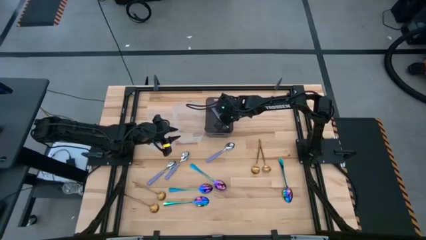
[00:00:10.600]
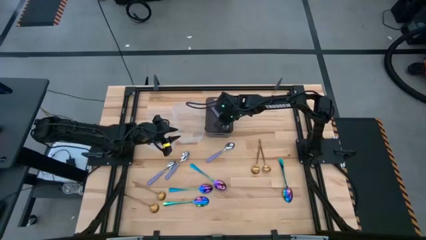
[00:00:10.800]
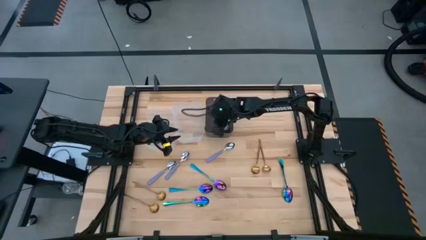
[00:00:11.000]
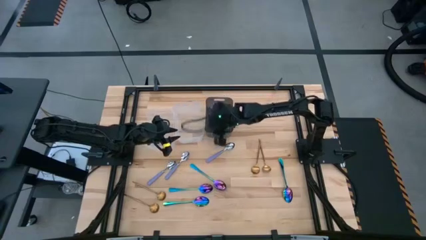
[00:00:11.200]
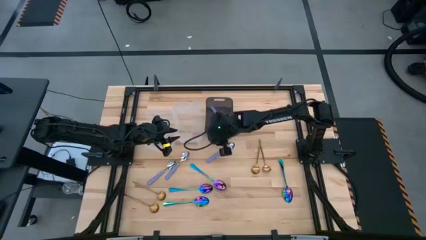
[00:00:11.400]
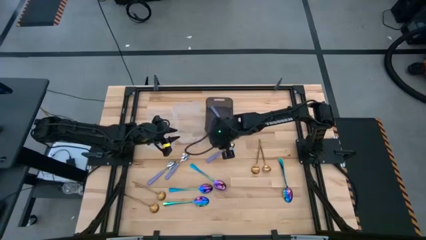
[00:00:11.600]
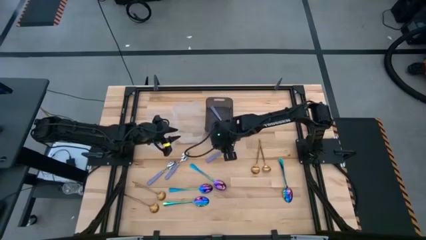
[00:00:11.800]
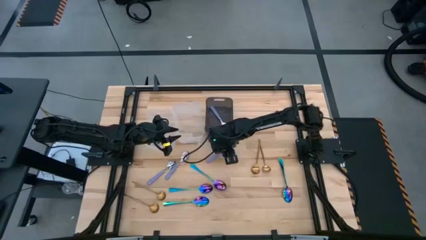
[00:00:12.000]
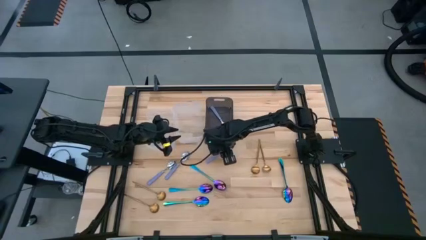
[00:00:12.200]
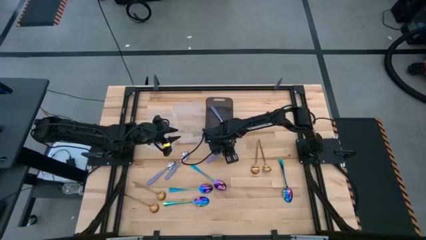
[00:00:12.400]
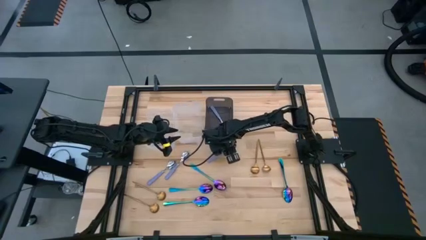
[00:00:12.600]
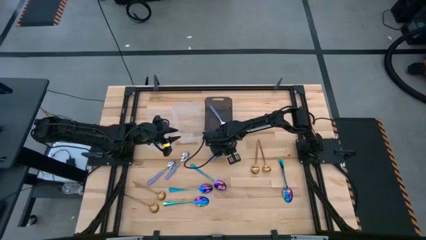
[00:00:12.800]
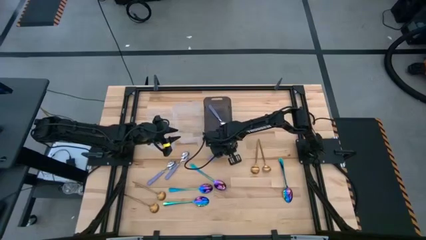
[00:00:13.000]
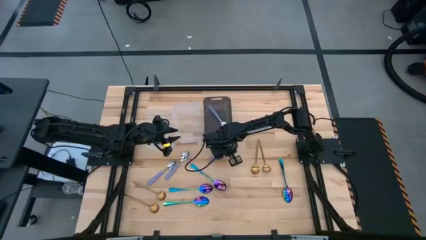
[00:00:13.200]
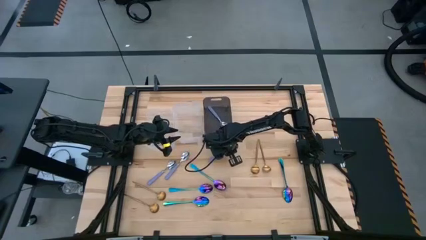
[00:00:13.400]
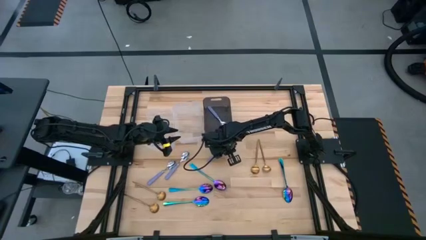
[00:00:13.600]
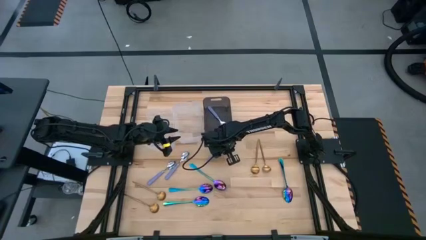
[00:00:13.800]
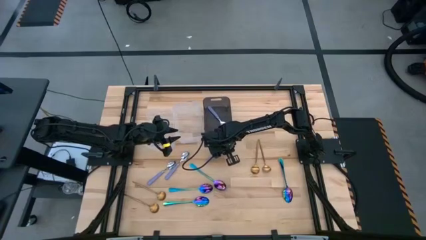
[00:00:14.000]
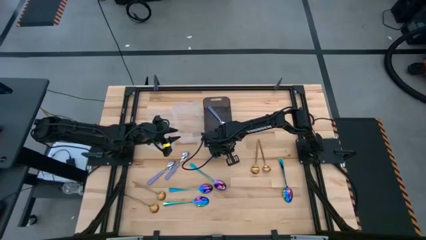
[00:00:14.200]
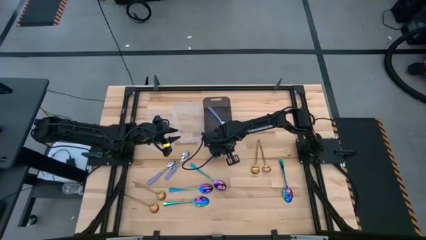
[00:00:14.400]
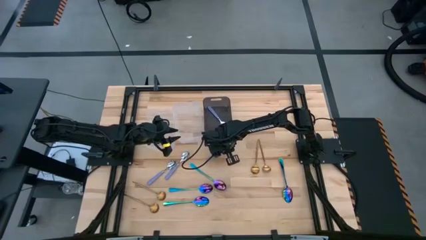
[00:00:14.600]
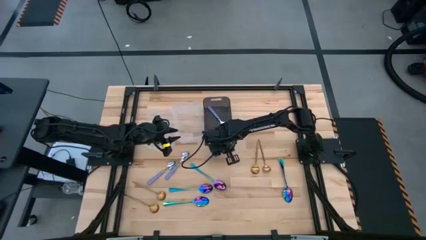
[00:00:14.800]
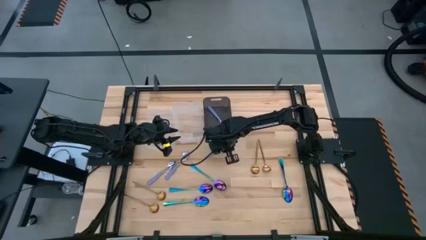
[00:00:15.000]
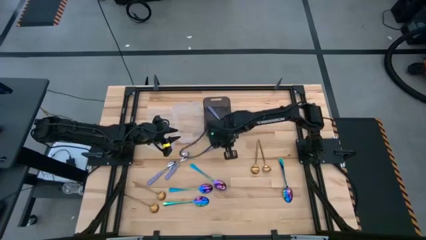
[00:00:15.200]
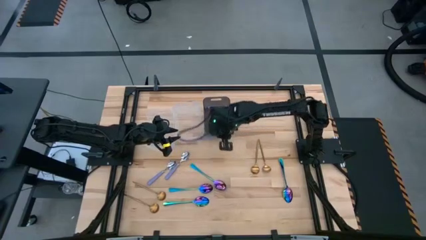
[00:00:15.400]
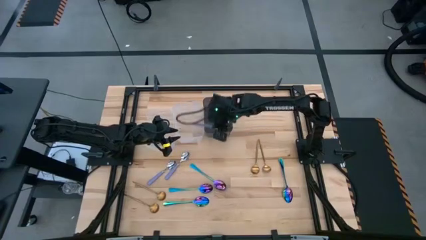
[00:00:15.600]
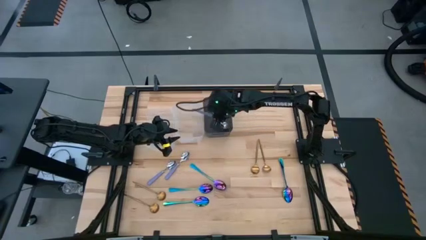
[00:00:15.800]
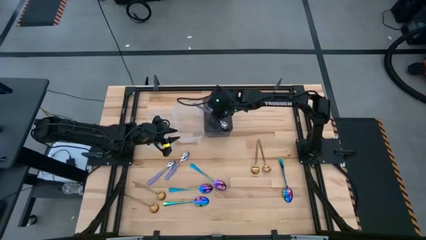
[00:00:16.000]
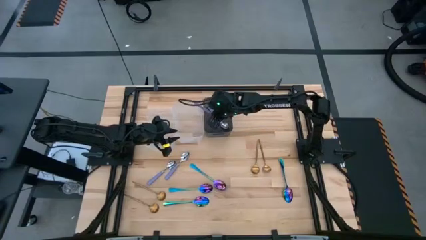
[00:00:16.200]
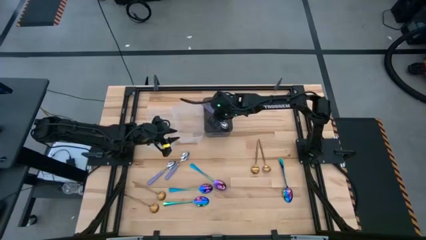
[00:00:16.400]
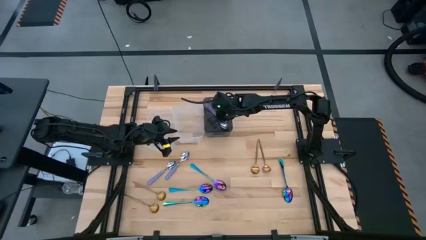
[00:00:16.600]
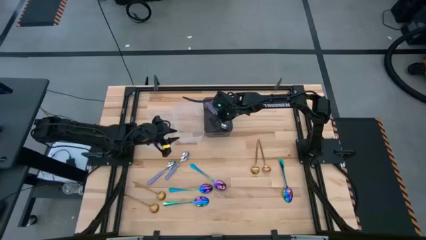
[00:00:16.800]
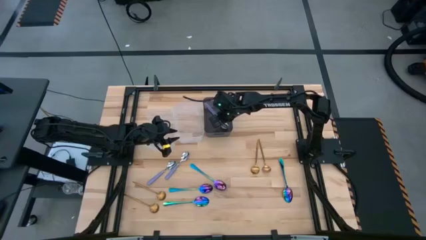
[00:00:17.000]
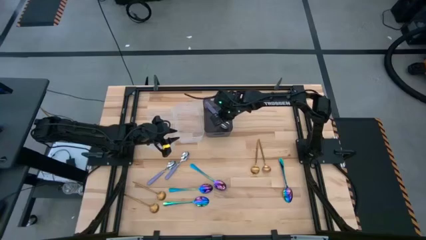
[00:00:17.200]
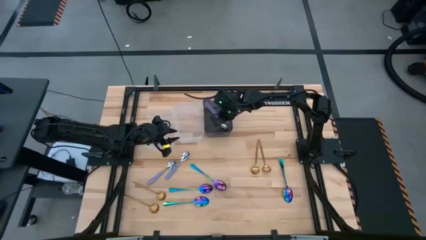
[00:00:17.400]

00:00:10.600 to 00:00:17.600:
Task: Sort silverware by color (type)
Put the purple spoon into the black transparent bin

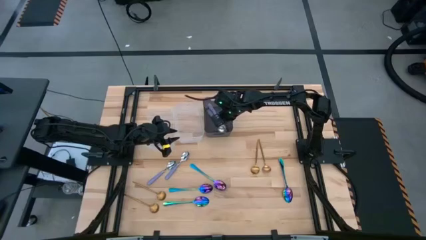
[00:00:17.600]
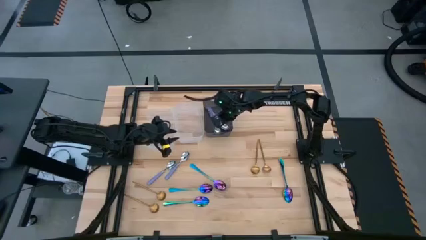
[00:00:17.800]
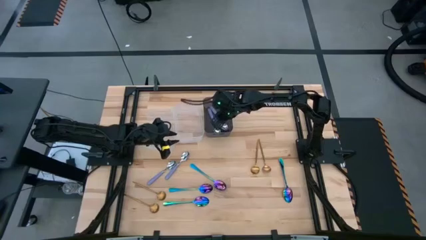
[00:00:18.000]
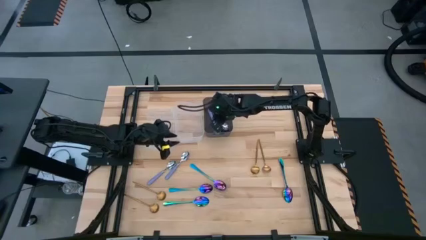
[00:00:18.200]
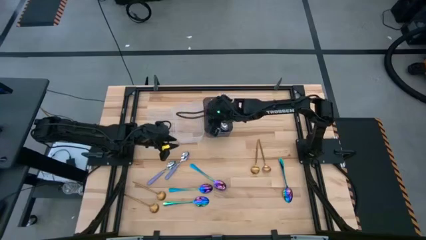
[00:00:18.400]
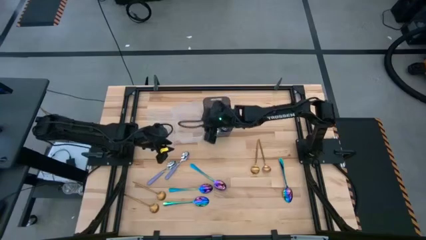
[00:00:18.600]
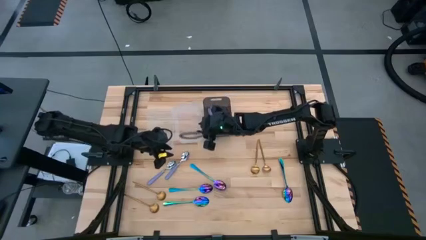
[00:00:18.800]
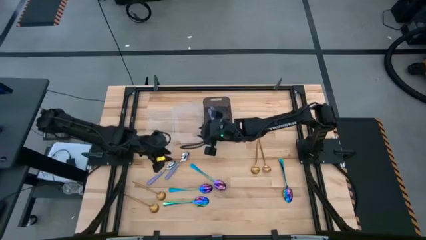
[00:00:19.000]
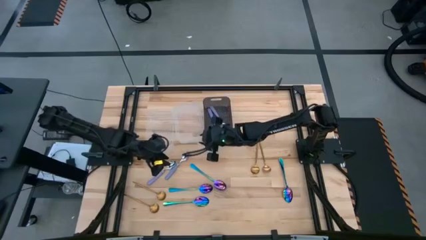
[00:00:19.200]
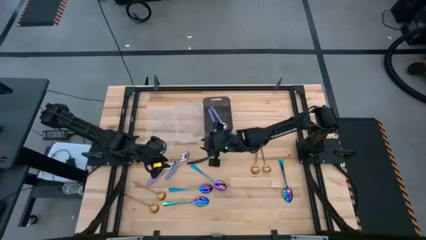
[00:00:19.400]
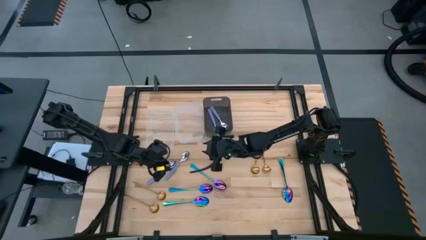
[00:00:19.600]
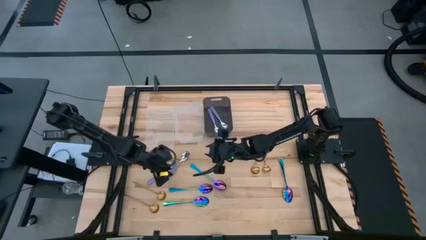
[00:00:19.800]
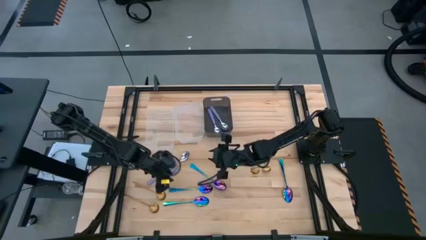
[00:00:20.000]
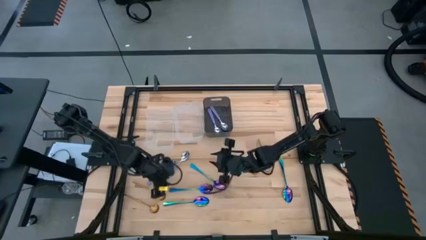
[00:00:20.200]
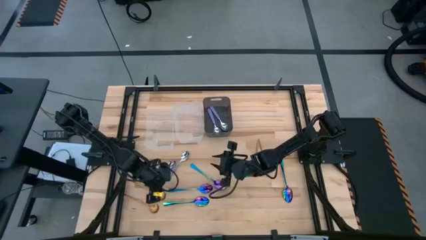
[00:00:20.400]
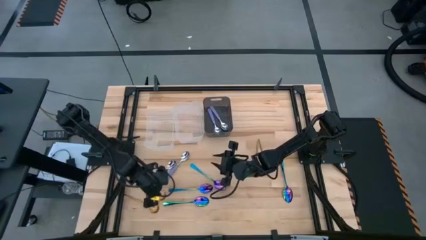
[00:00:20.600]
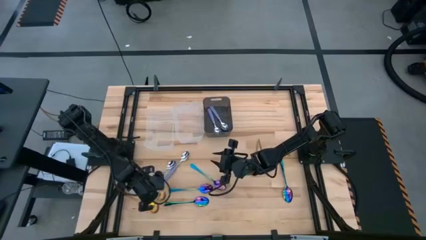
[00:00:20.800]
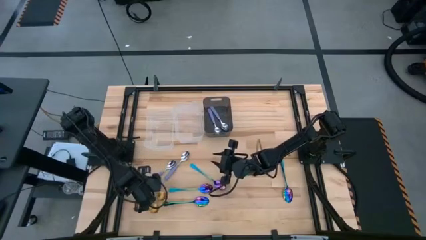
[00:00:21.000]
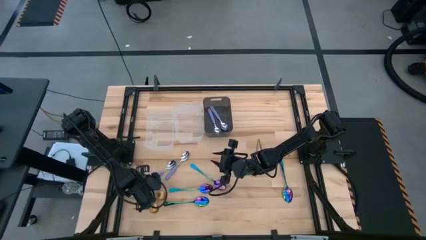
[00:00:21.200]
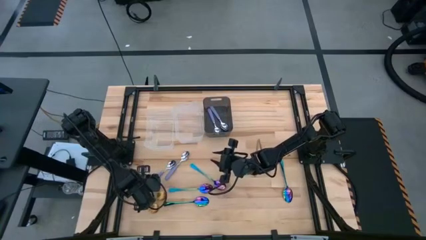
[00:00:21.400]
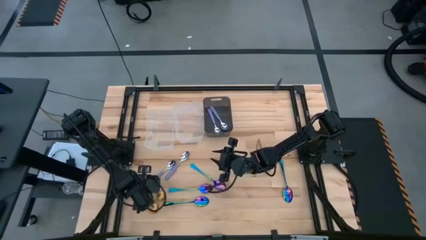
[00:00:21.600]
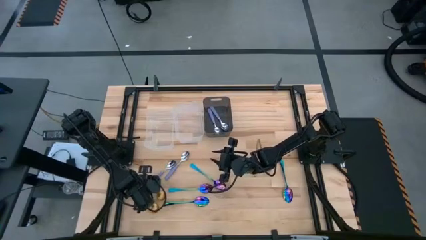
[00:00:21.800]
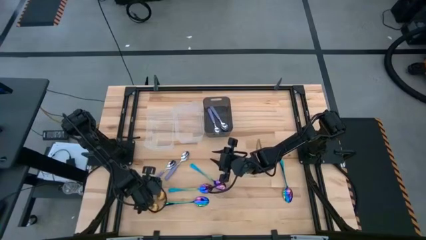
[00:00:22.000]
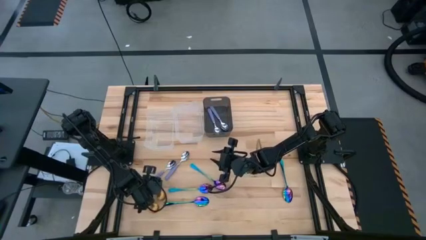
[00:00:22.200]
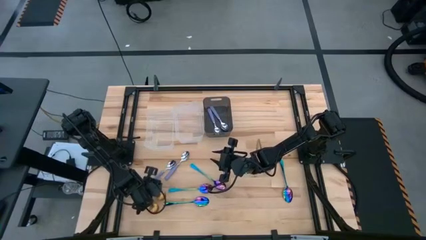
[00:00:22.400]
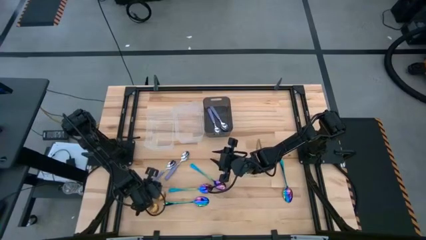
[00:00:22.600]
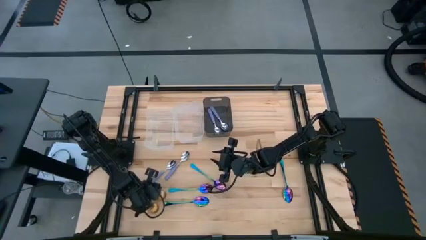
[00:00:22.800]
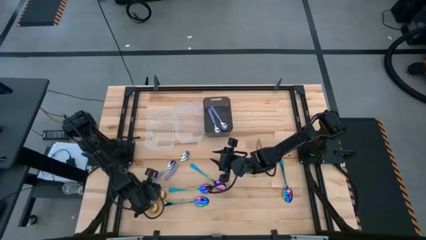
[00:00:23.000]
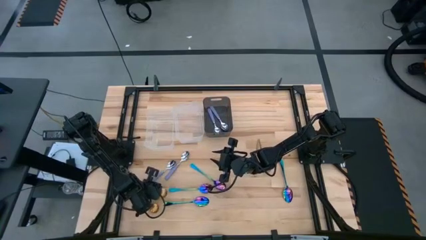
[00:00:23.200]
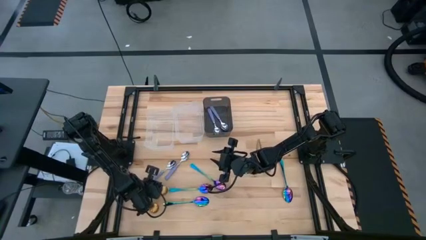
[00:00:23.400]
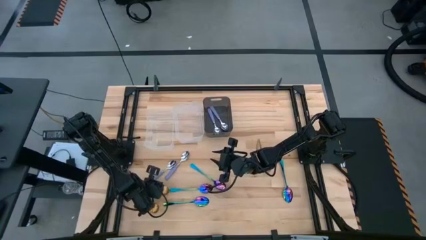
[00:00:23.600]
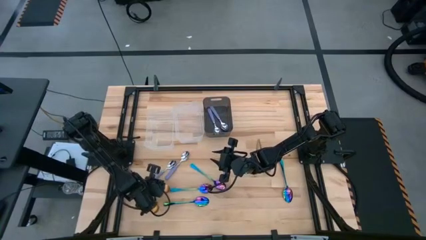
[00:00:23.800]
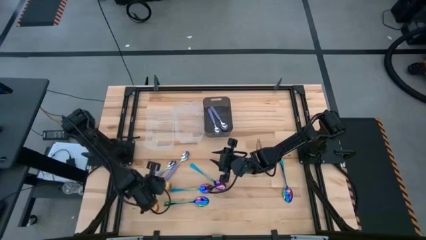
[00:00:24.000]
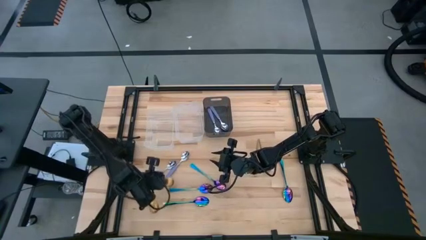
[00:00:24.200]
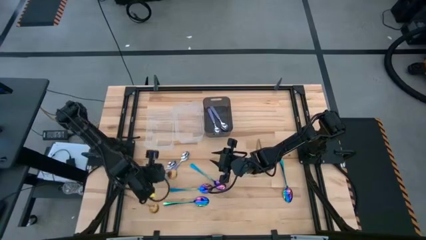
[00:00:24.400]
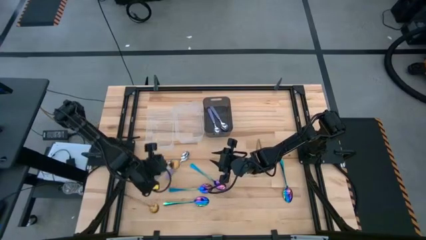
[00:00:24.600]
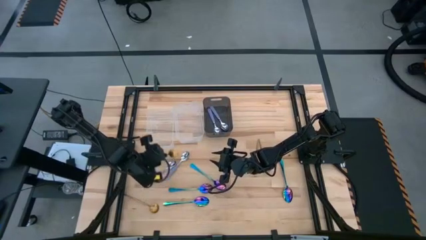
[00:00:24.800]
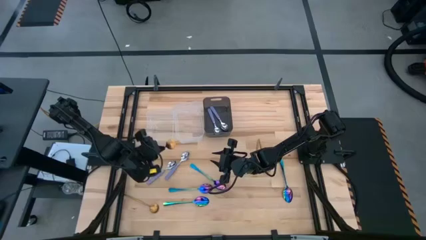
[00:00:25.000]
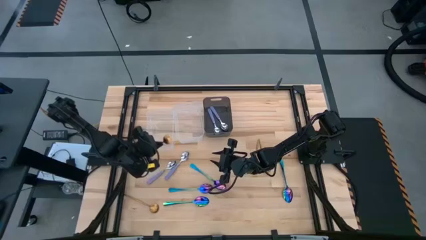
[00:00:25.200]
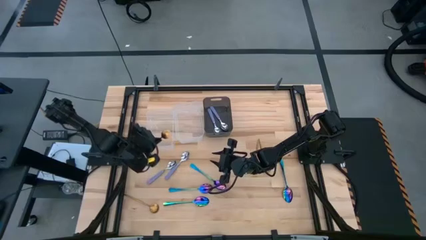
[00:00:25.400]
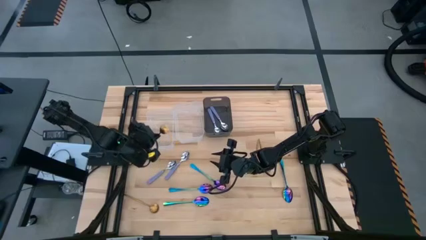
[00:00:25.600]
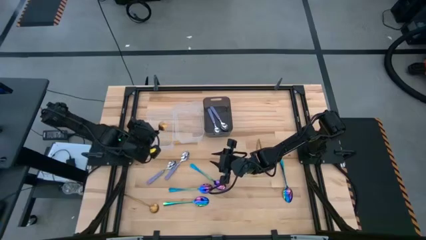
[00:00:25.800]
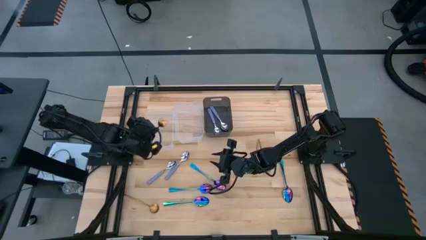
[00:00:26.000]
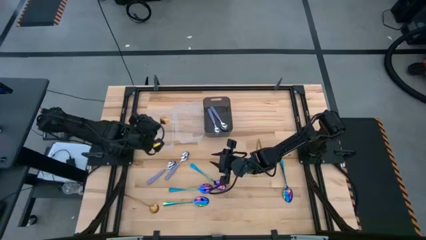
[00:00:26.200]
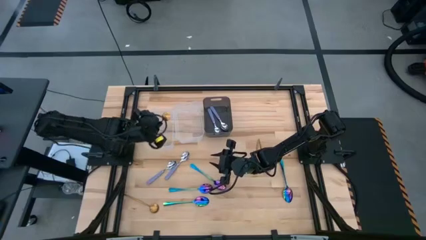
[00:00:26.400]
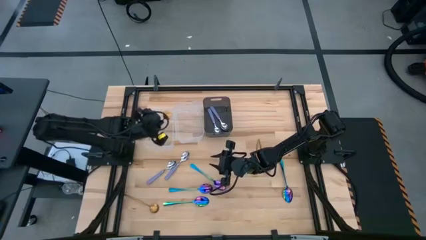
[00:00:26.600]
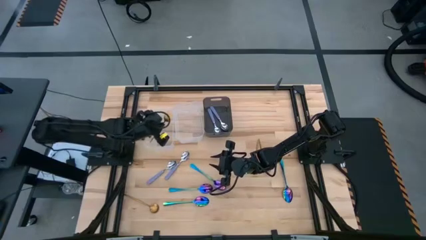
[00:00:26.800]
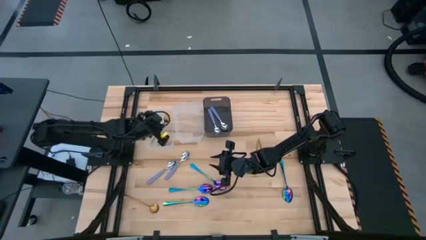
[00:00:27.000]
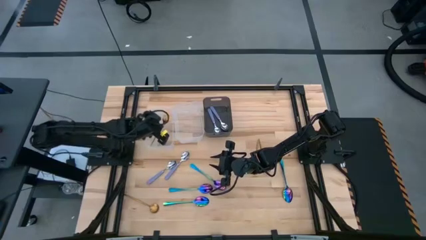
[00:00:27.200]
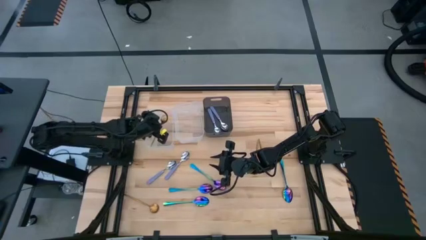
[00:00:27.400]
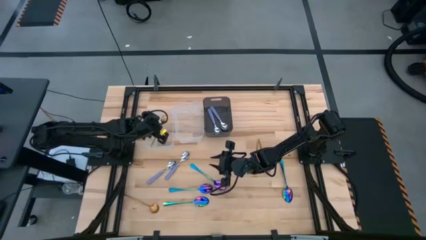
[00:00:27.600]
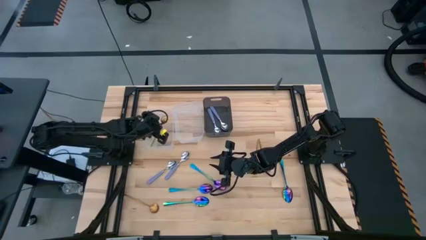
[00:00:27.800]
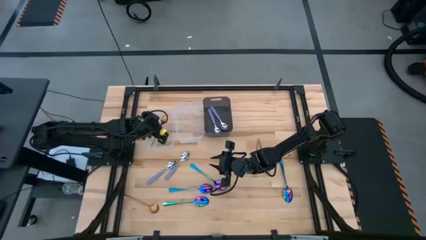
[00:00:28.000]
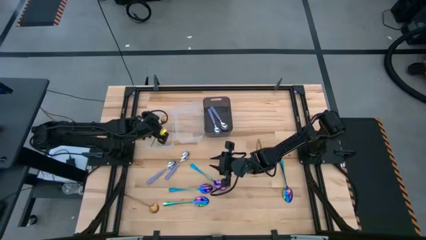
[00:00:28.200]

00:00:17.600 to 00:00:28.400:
Put the gold spoon into the left transparent bin
